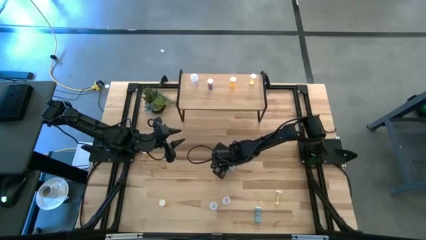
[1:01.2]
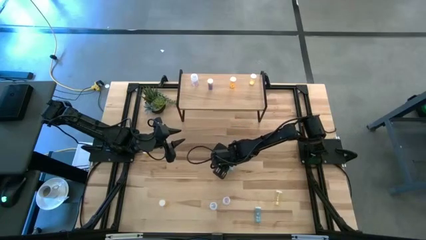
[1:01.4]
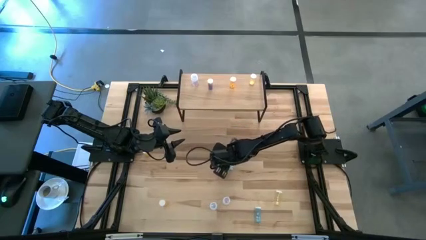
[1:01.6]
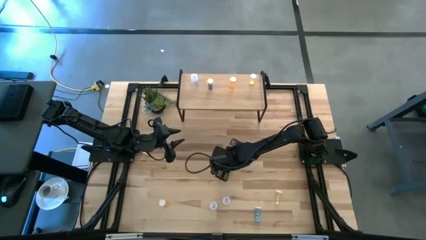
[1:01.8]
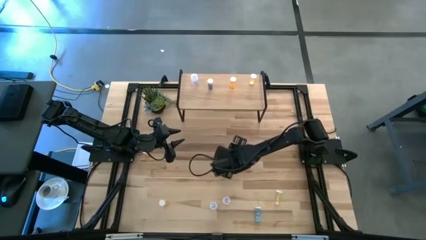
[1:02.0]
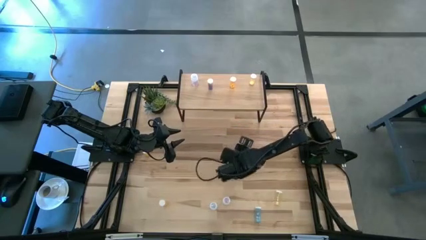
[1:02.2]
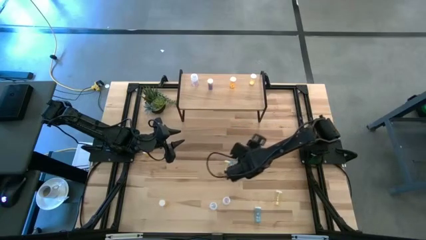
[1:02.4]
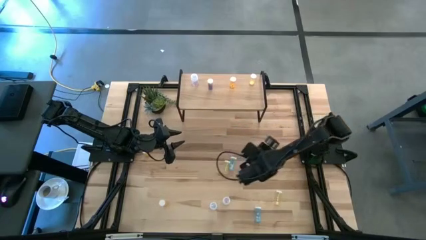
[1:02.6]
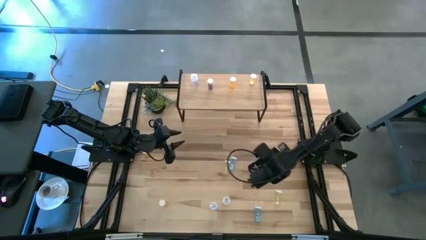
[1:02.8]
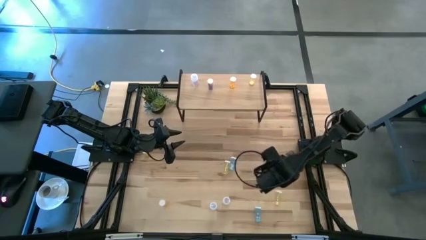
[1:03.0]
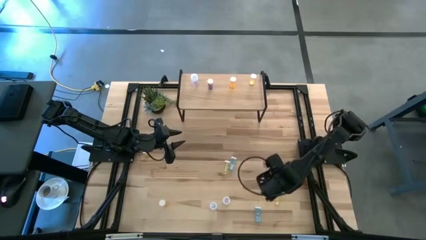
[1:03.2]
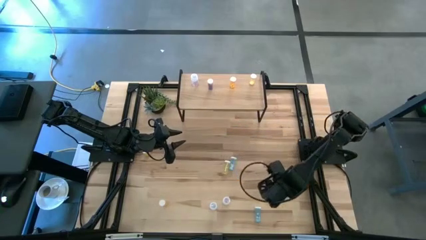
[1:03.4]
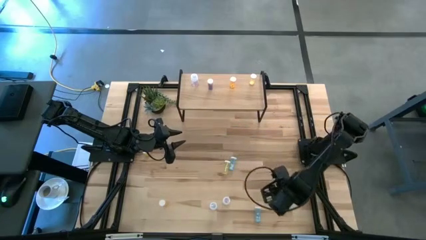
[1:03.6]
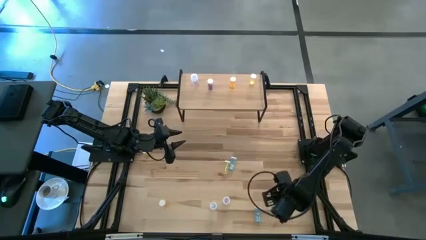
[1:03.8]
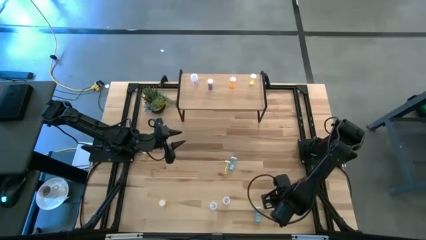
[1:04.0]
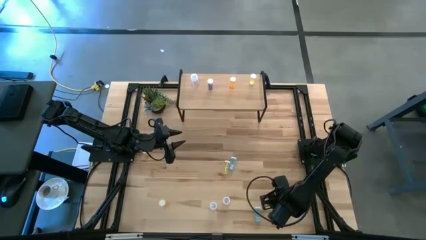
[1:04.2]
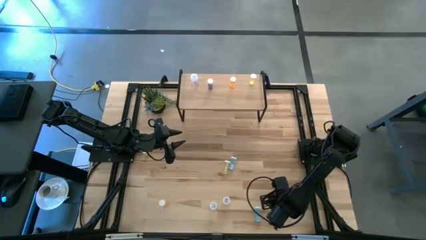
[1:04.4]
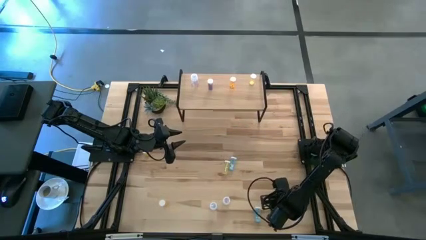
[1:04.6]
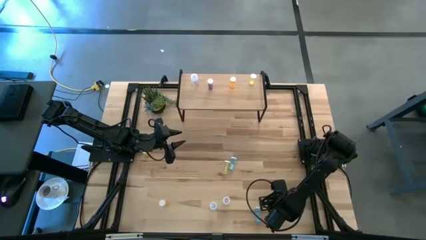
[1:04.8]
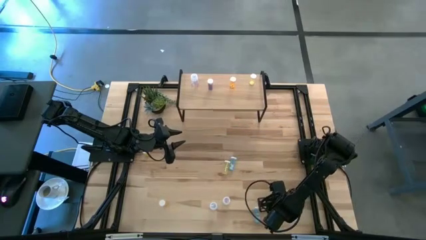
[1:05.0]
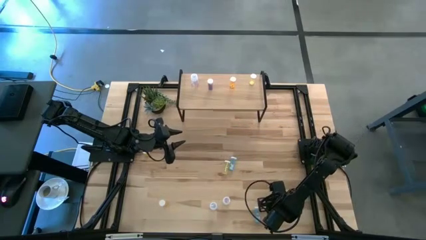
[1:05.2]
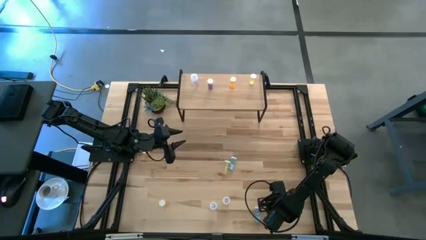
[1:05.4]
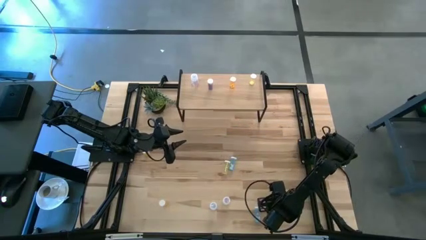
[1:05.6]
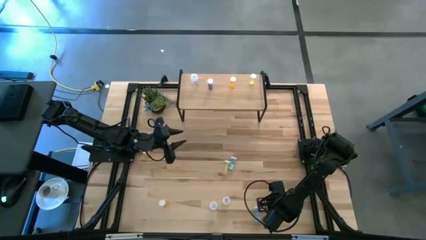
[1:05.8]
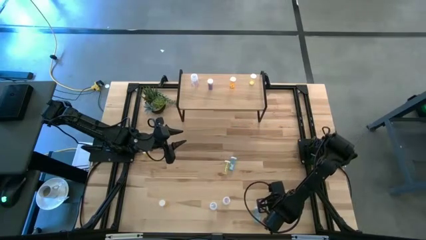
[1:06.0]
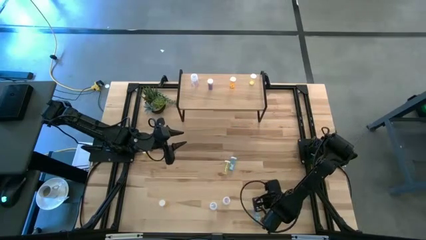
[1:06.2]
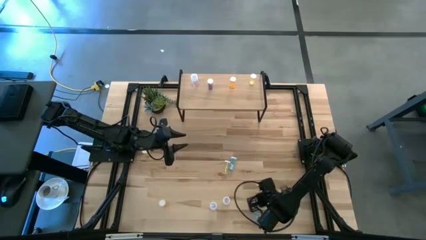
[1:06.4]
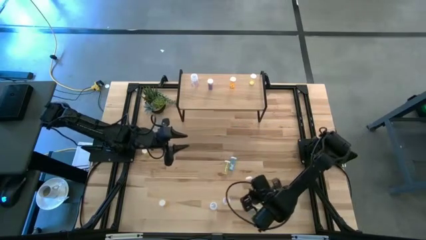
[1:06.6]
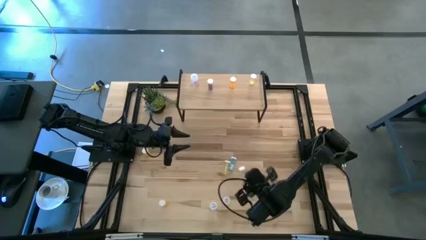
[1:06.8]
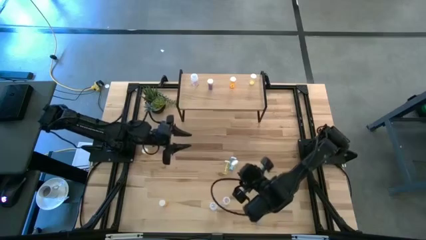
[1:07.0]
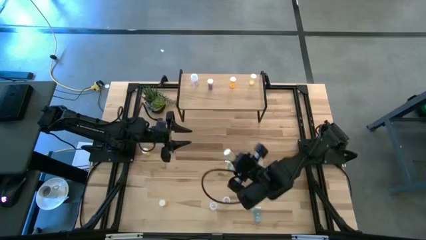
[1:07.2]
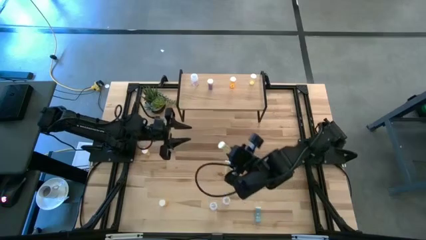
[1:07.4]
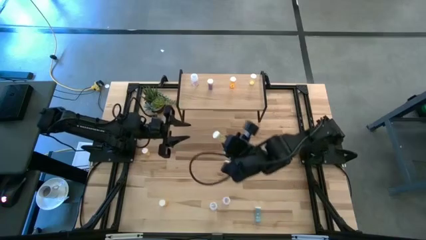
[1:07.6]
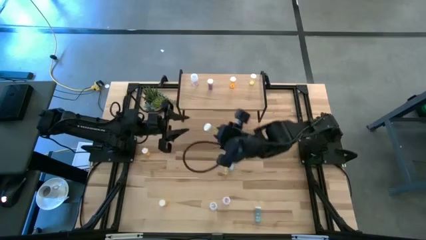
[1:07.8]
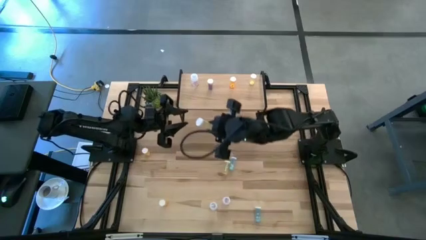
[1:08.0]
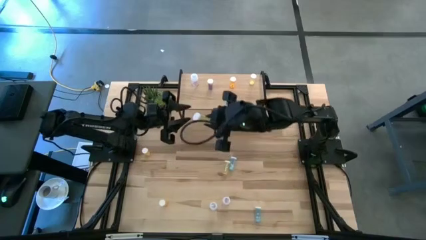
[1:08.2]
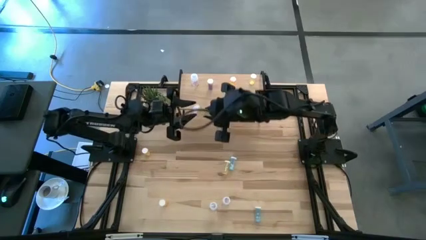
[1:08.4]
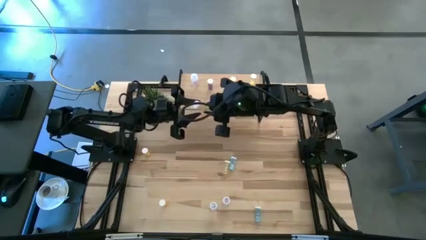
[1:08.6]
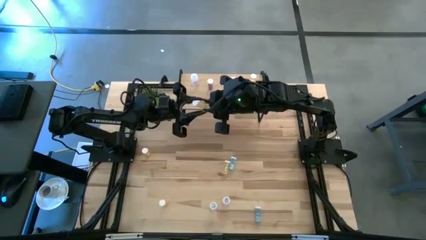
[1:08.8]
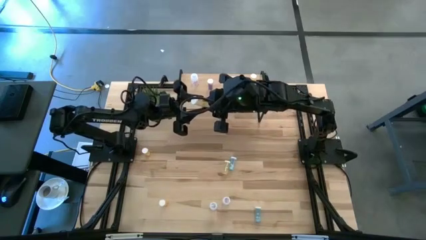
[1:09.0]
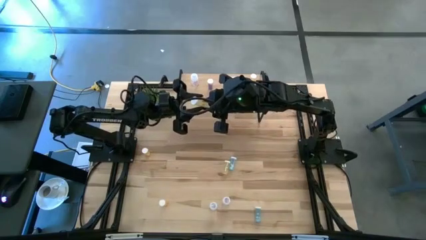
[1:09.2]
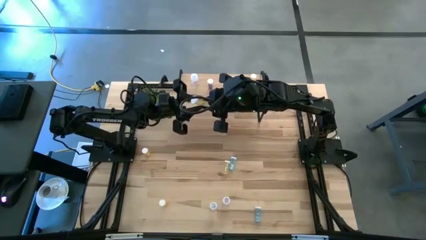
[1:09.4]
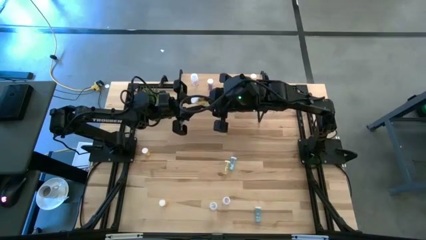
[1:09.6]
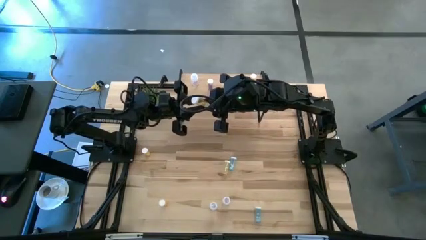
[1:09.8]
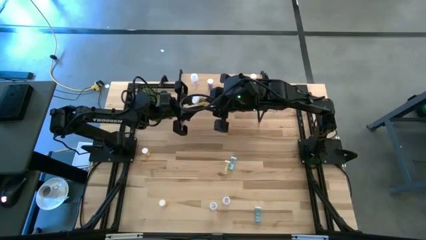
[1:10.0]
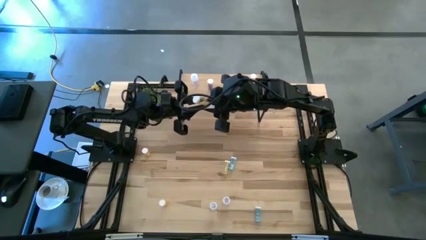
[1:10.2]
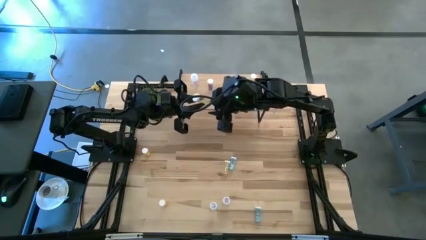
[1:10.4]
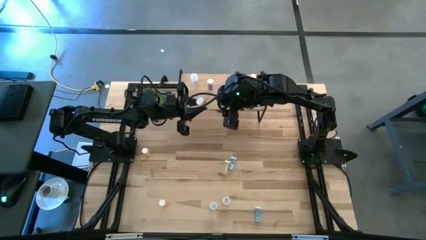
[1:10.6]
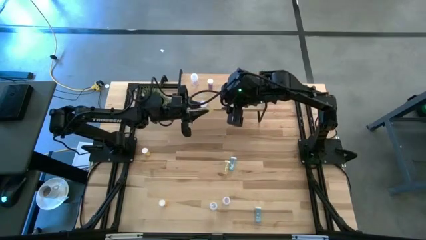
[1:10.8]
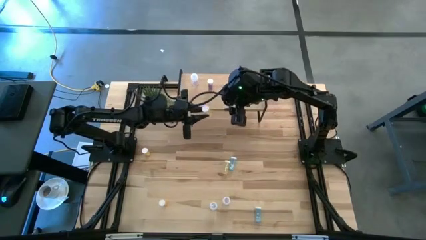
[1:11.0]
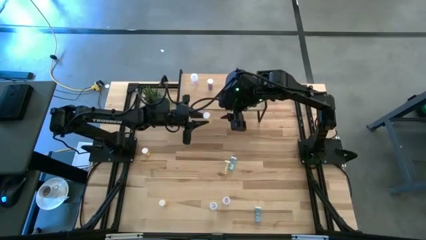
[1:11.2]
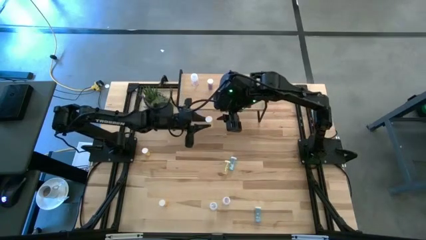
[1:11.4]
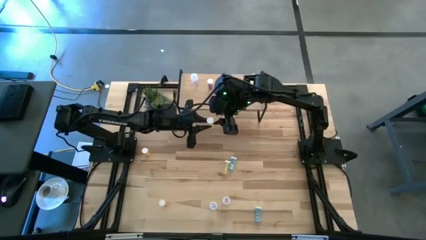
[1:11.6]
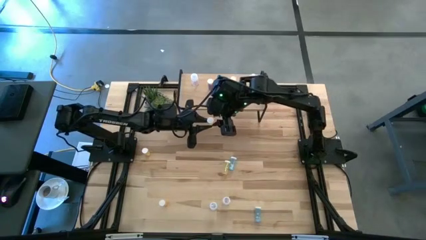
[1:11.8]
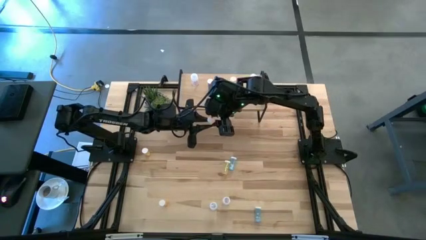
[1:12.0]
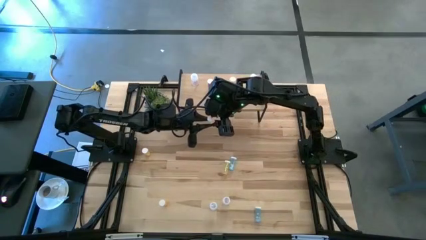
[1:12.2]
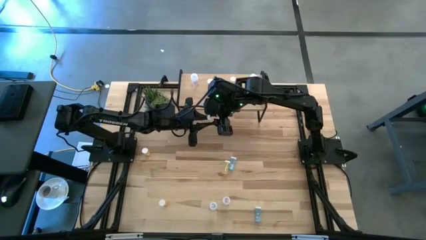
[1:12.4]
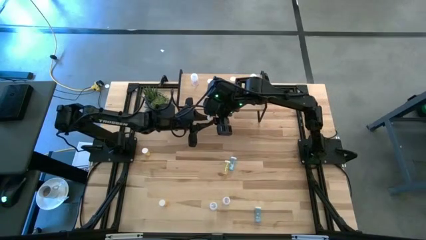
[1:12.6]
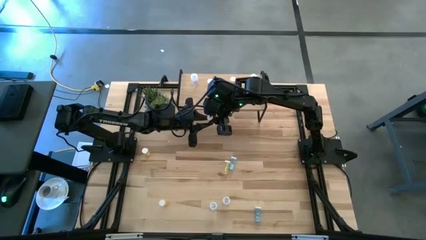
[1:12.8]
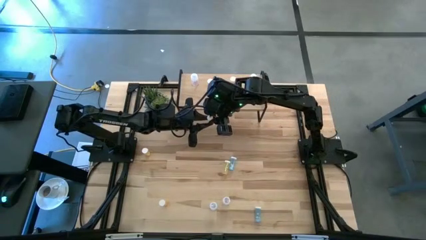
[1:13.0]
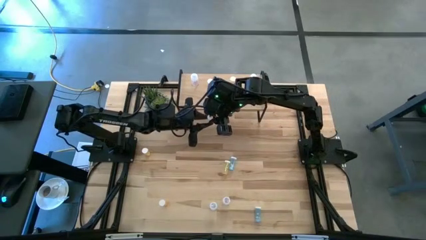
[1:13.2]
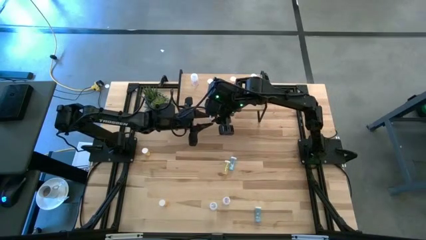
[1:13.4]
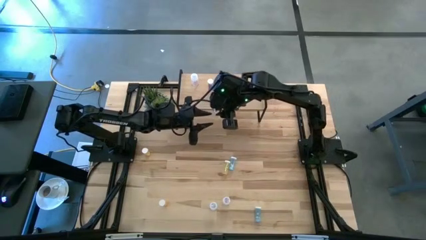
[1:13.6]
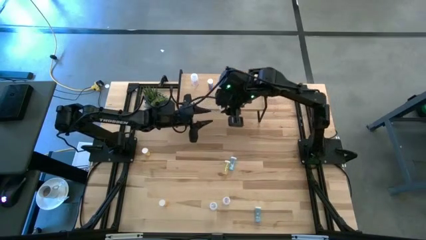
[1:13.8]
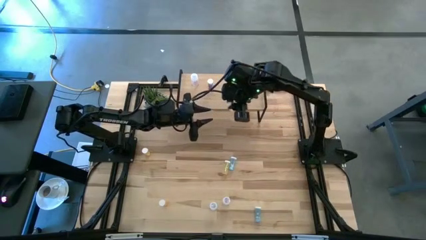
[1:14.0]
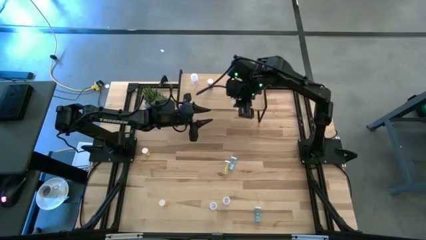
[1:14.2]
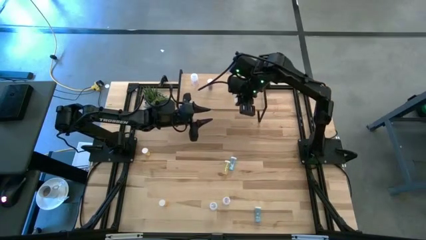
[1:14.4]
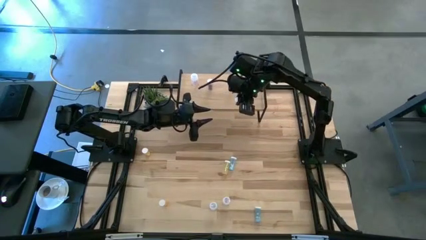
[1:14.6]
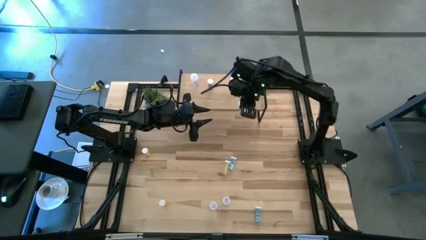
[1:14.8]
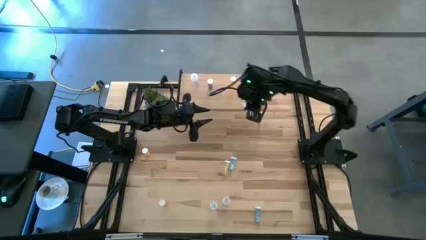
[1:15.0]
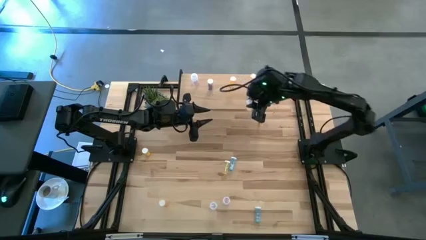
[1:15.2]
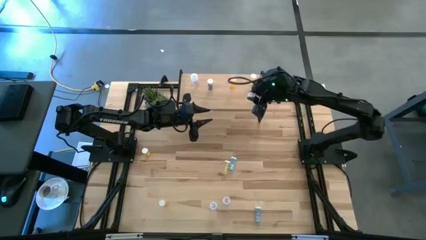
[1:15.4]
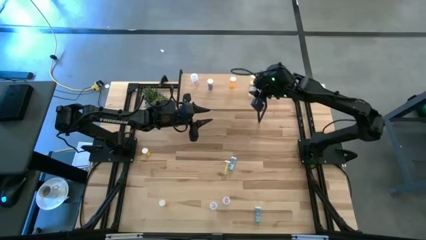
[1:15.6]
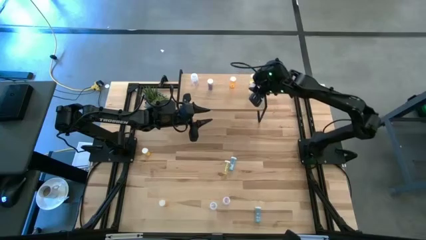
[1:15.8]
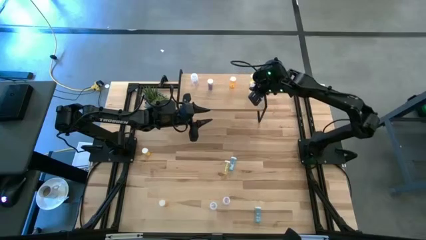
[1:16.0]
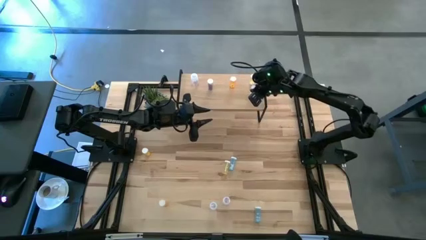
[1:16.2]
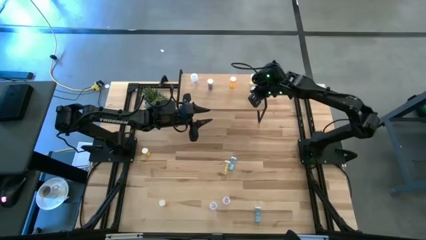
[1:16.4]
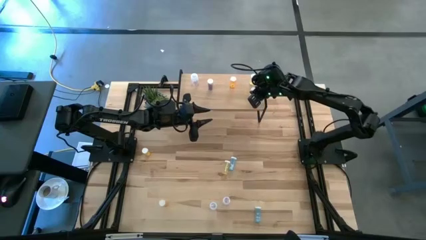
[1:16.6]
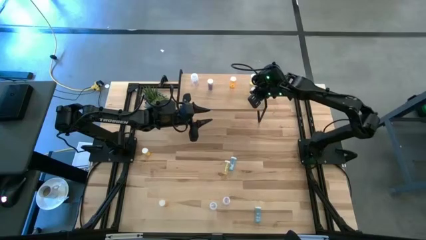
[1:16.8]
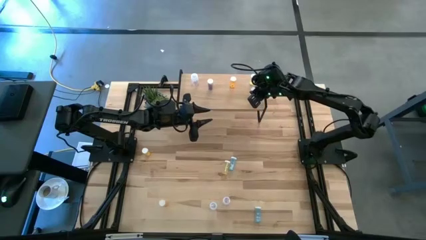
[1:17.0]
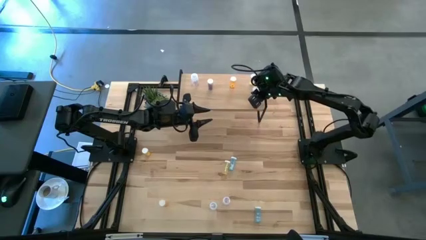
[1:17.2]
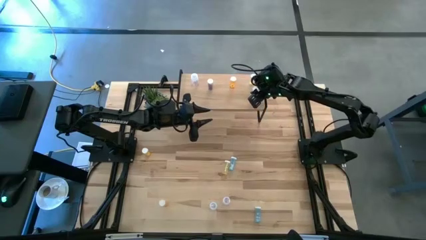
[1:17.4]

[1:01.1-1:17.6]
Task: Pick and place medicine bottles onto shelf by color
Put the bottom yellow pill bottle on the shelf aligned with the yellow pill bottle
